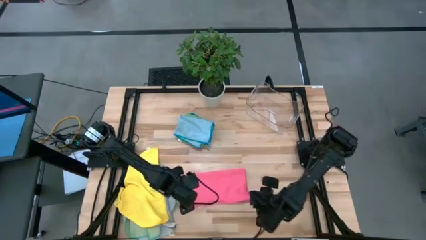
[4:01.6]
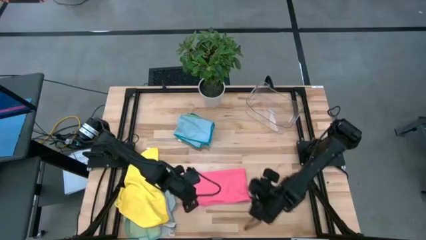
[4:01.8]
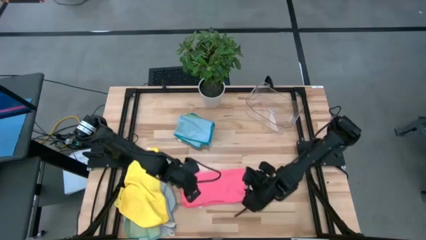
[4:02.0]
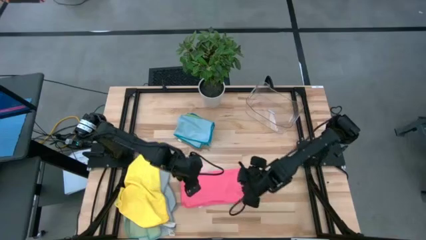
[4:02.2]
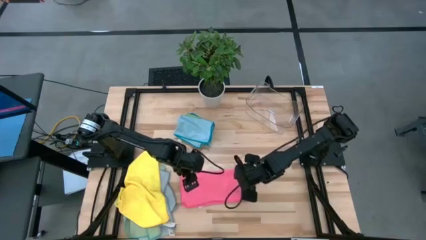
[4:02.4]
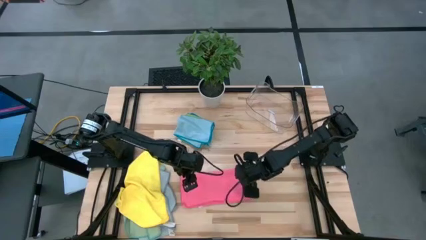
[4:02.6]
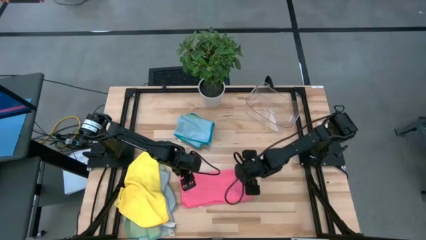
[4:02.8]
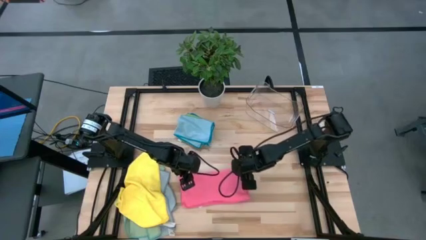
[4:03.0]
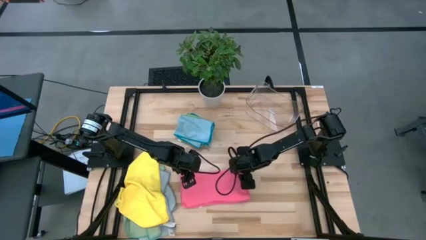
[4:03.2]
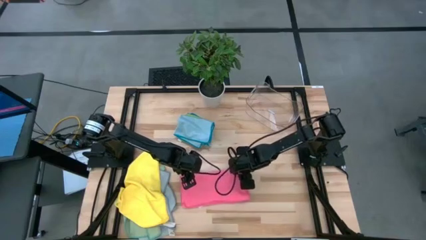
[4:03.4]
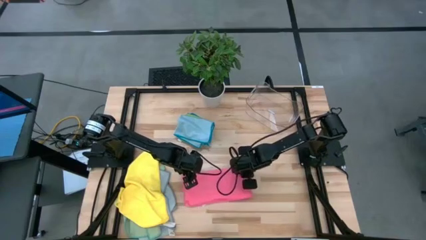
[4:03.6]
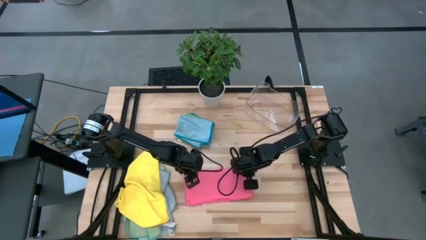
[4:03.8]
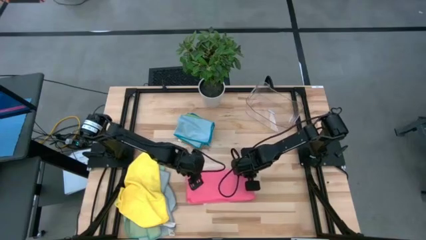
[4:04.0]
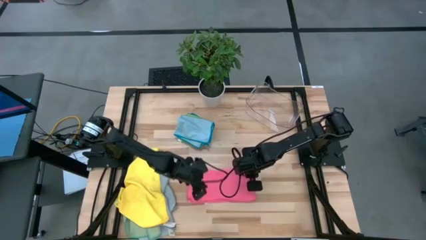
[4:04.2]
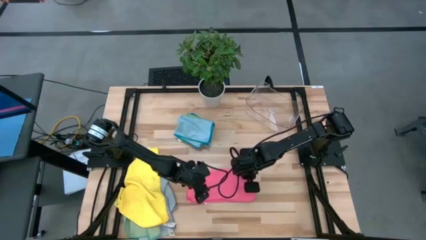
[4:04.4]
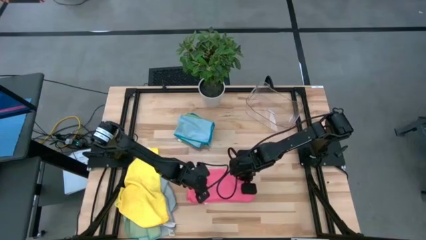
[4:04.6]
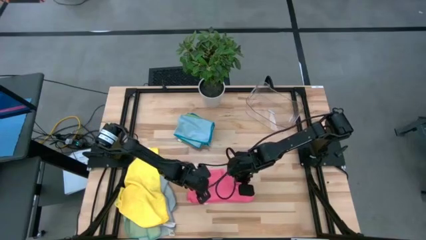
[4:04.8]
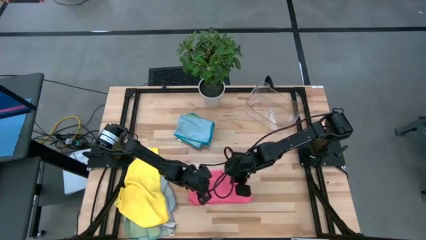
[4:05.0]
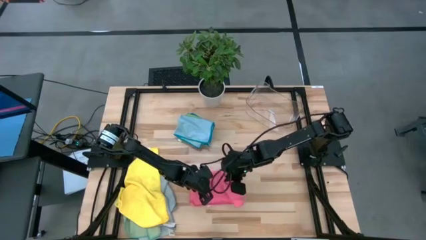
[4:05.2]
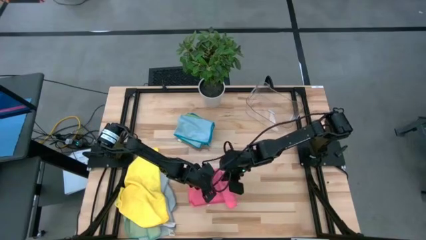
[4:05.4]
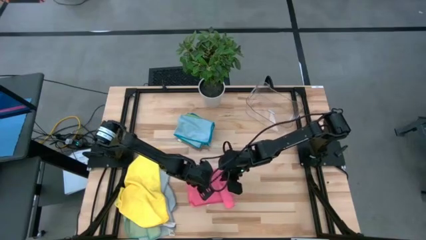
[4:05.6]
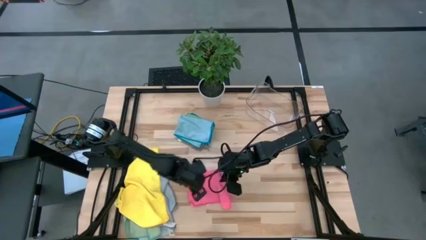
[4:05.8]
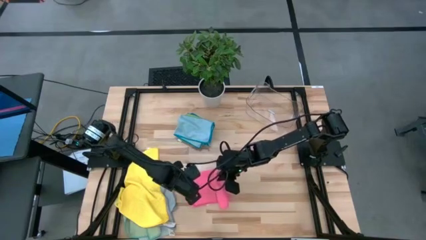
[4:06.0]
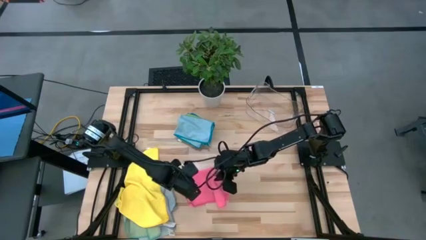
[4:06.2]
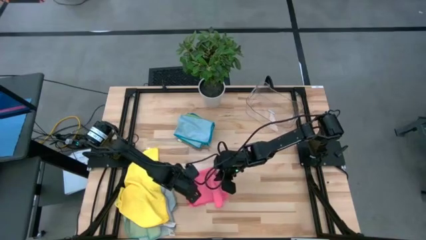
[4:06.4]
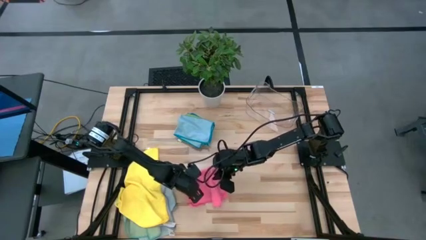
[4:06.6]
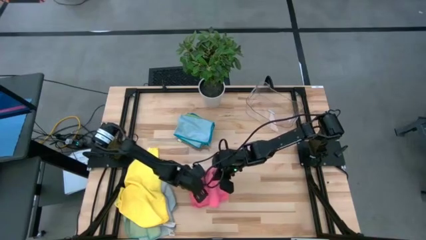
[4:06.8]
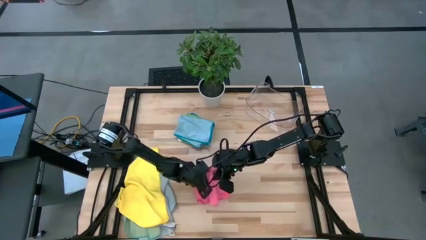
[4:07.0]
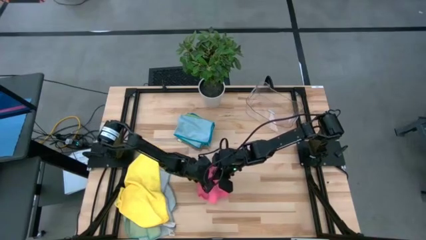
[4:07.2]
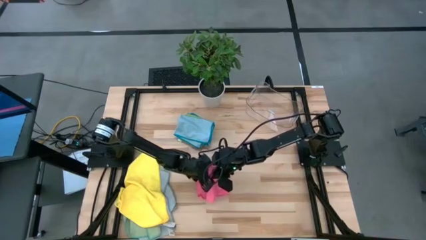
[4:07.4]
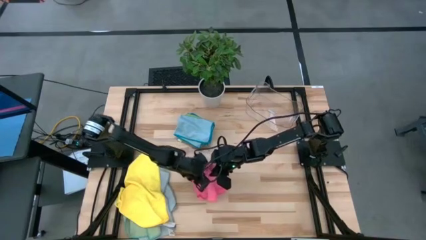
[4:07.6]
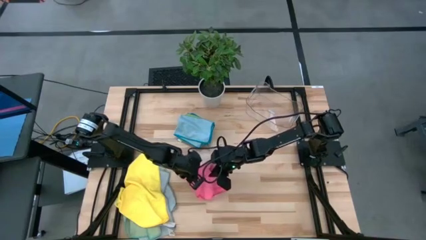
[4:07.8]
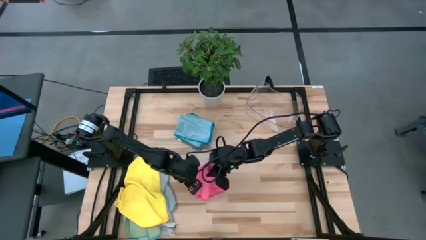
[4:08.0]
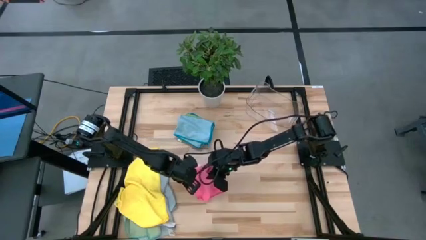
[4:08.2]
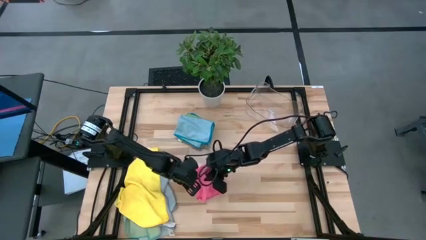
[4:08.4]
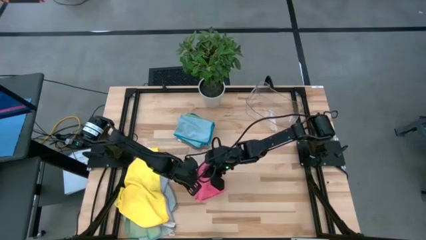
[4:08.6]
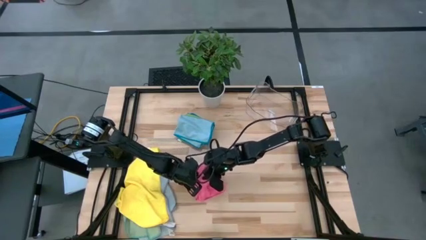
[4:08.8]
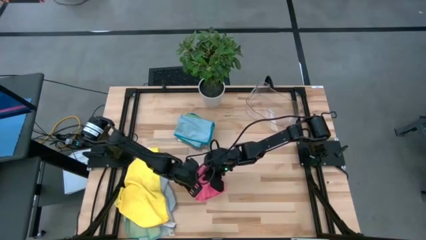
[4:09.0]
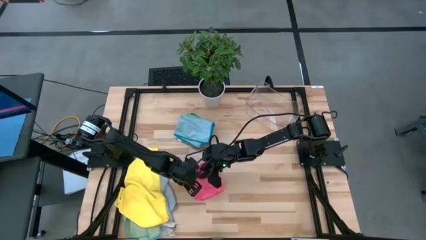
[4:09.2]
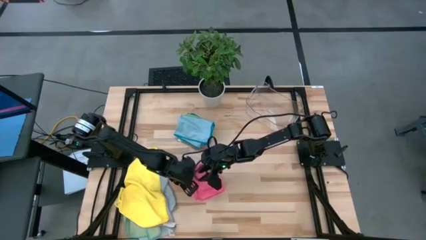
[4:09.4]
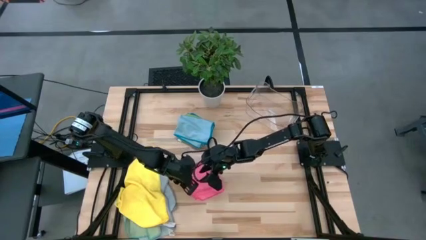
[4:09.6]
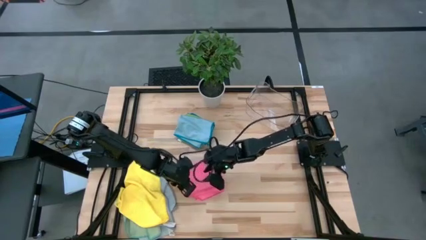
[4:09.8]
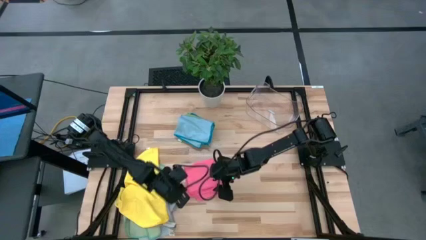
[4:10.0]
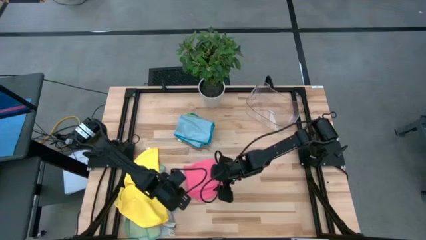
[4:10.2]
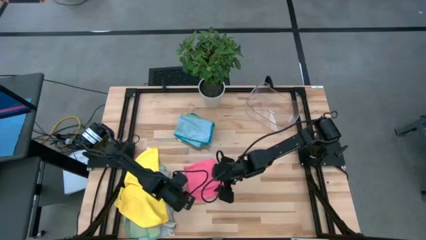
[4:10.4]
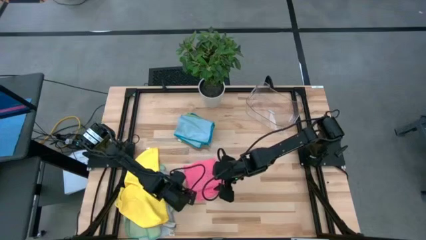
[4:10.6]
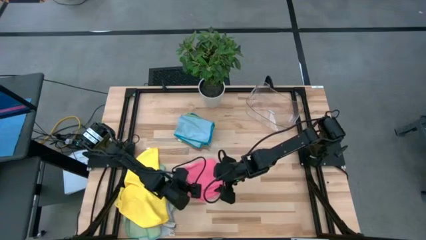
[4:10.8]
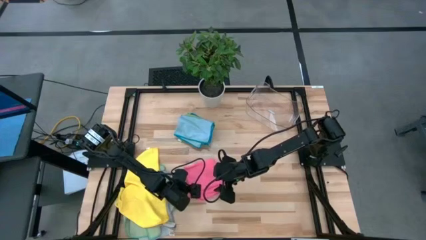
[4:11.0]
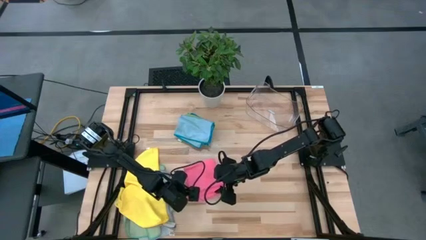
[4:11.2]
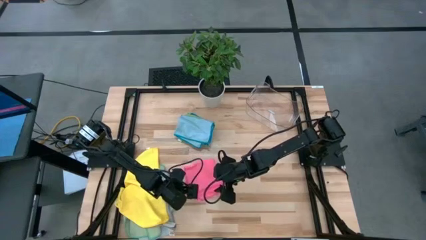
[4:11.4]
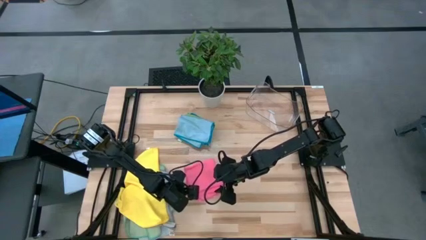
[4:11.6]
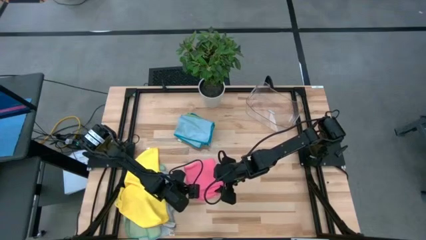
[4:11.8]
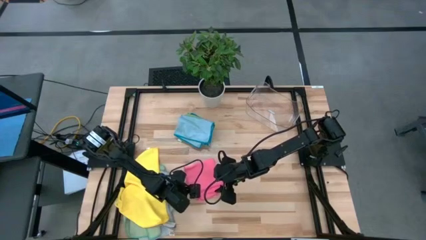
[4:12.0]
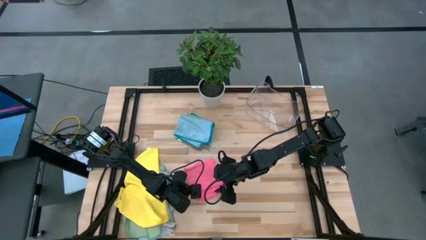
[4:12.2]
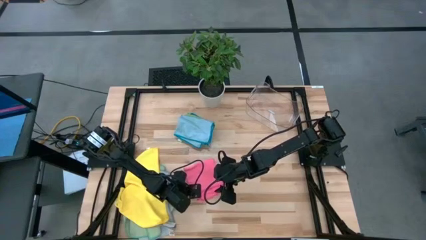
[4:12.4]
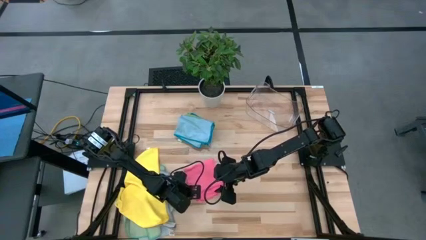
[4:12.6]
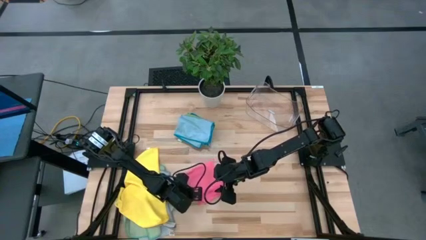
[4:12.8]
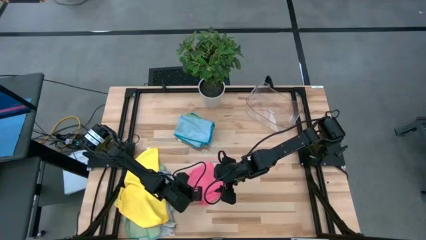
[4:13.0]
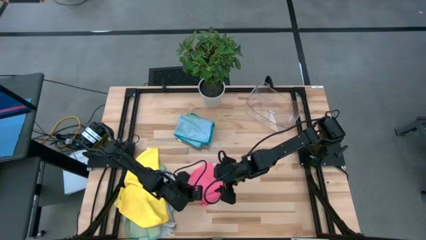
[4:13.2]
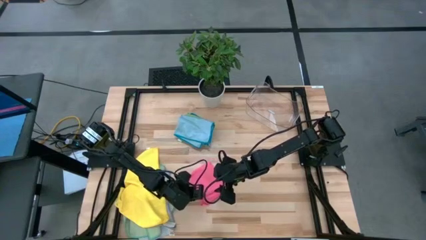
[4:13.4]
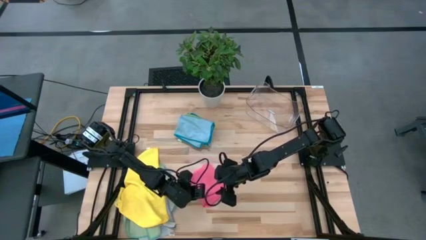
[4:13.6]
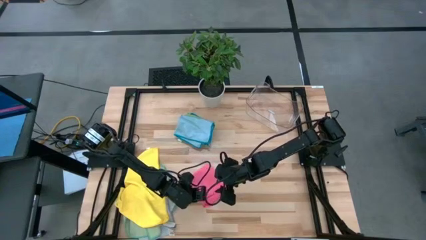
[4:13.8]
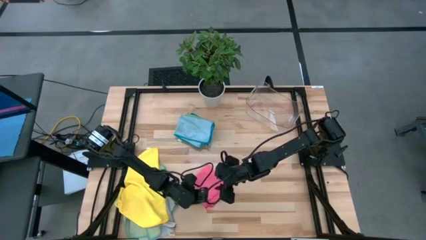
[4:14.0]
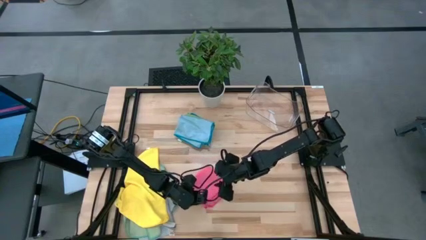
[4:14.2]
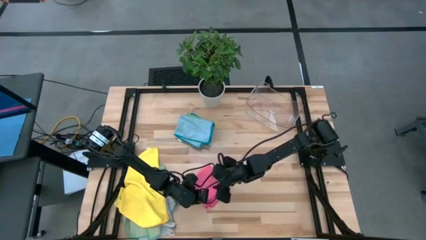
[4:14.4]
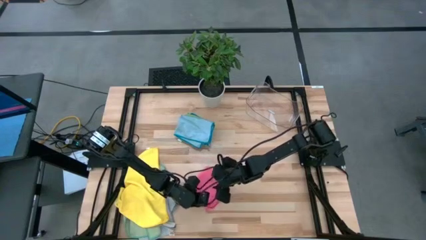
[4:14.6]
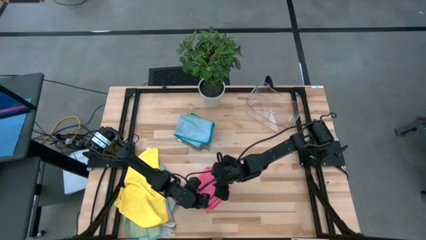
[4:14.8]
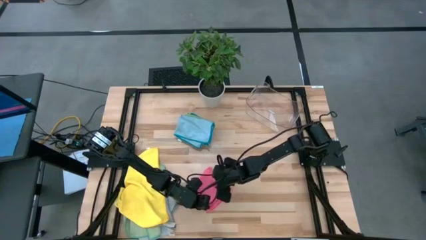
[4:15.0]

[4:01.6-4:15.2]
Task: Fold microfiber towels
Fold the pink microfiber towel

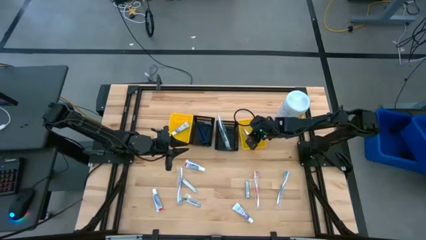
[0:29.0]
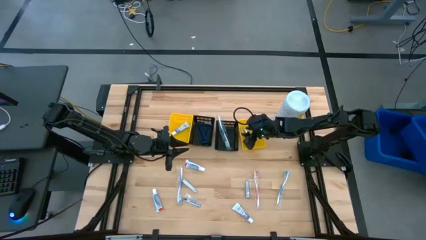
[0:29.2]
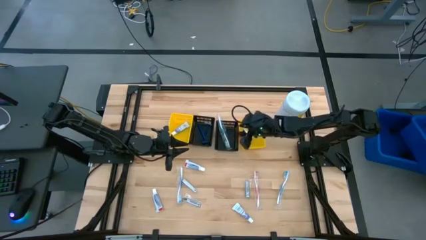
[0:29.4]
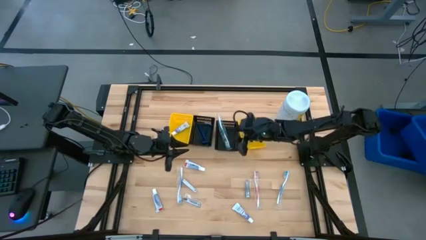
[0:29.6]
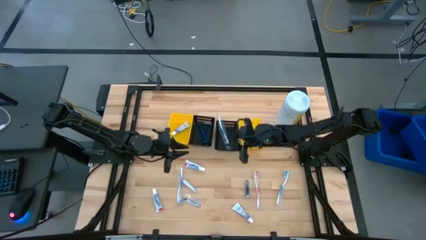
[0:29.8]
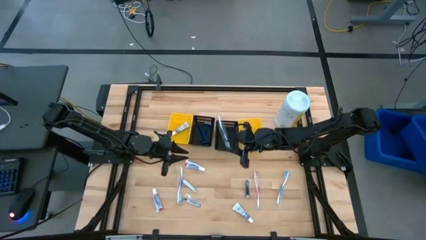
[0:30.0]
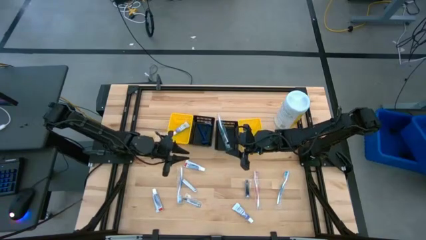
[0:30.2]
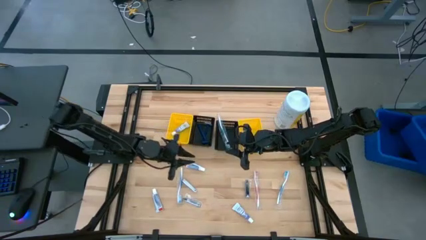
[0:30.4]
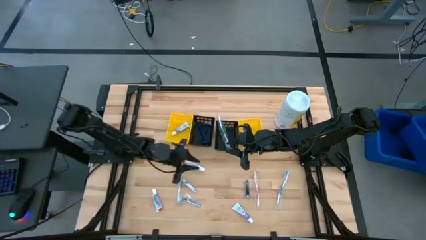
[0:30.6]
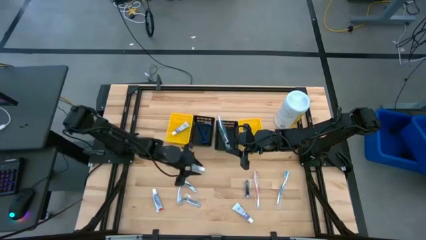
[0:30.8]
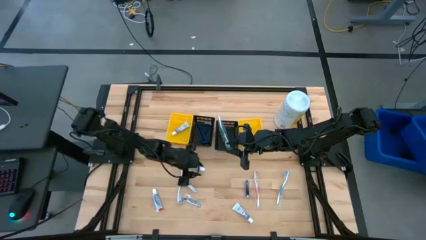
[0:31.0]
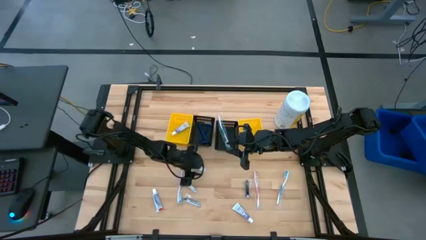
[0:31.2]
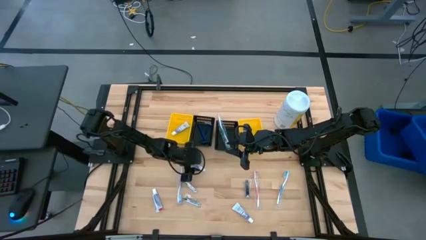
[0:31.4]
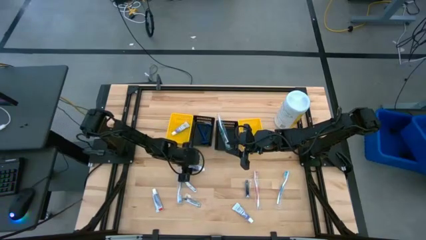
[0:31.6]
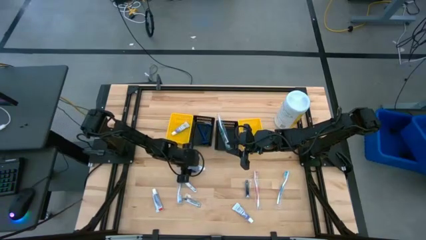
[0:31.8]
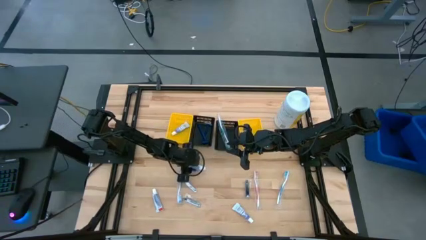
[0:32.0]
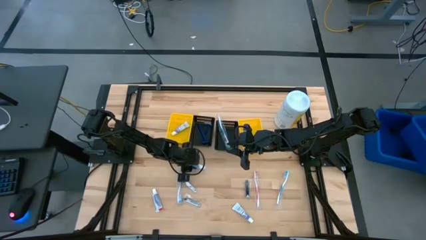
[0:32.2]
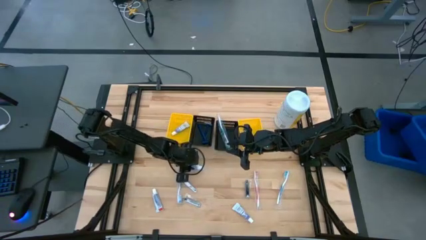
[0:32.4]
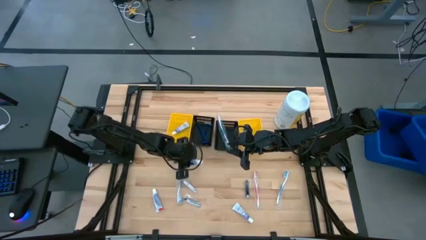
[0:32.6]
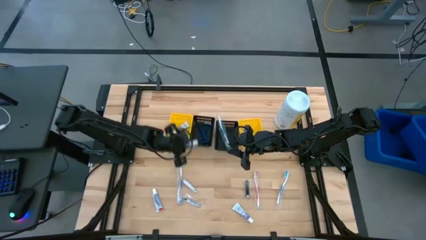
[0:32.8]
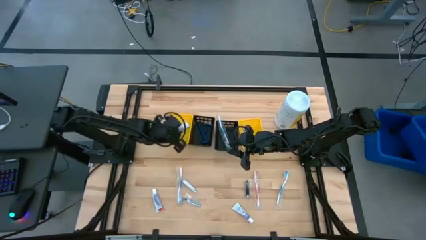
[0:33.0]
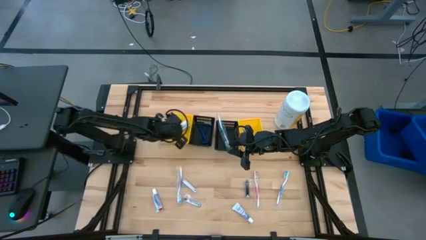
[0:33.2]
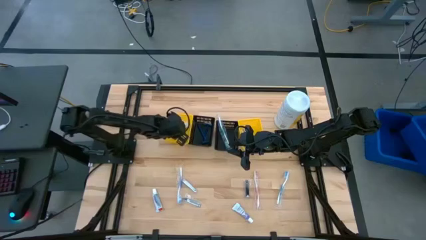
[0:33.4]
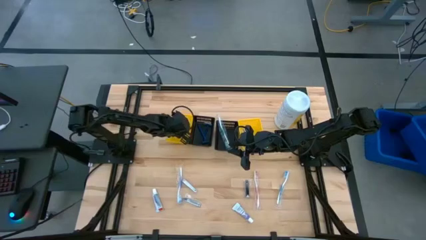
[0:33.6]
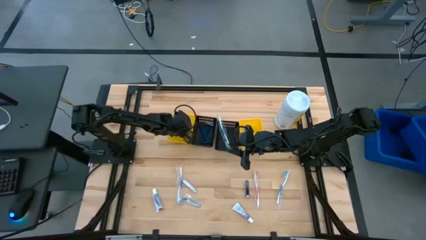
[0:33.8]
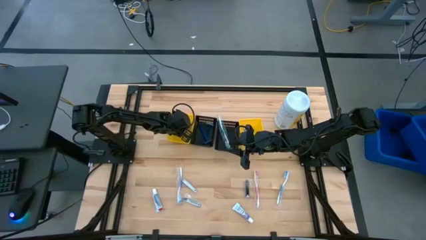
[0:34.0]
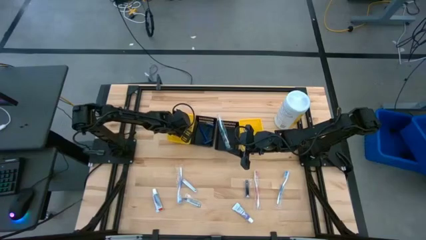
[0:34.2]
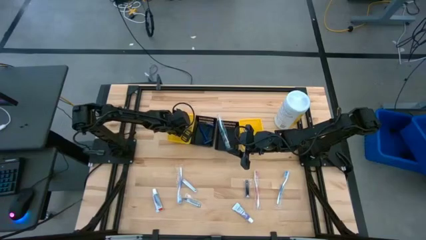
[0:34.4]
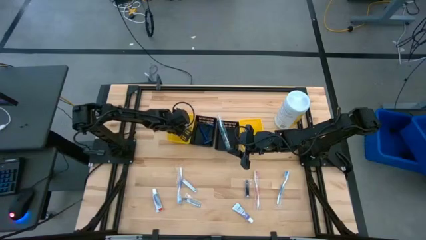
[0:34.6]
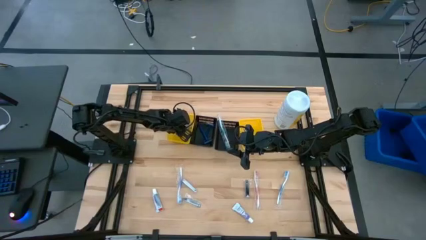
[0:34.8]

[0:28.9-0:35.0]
Task: Pick & Place Travel size toiletries
Put the white toothpaste into the left yellow bin
